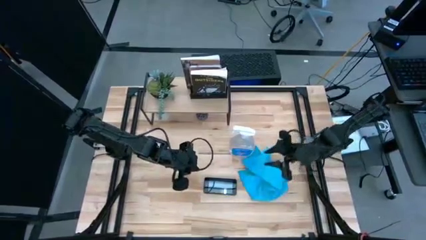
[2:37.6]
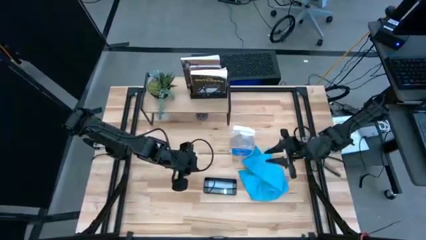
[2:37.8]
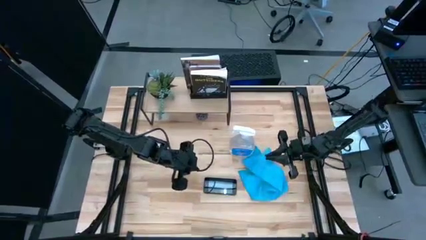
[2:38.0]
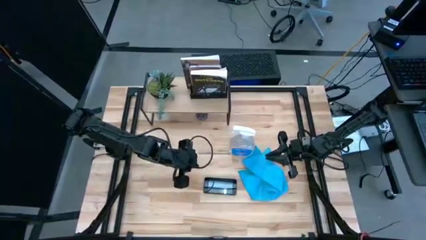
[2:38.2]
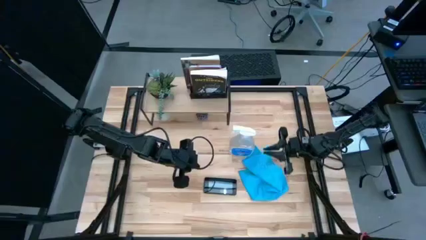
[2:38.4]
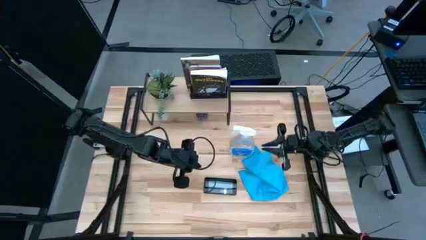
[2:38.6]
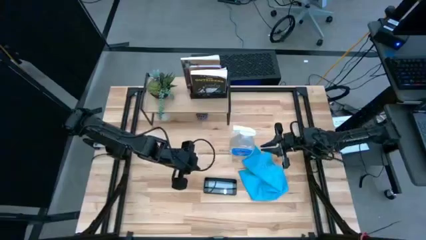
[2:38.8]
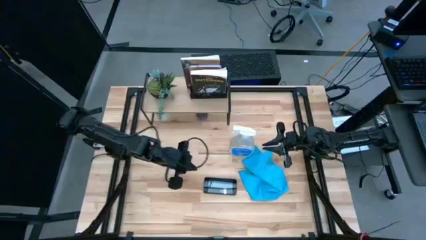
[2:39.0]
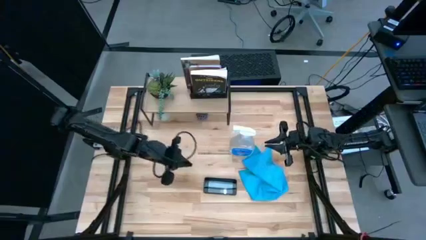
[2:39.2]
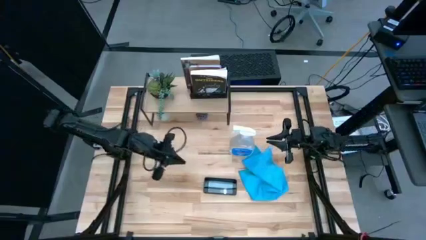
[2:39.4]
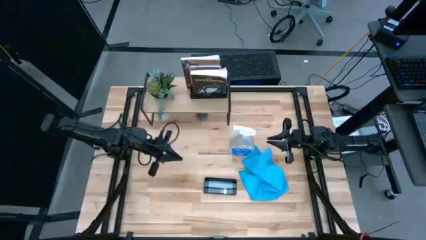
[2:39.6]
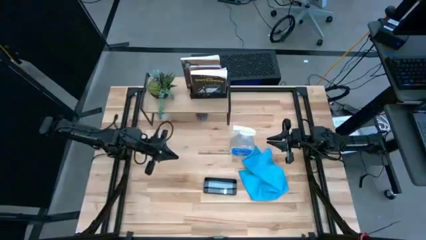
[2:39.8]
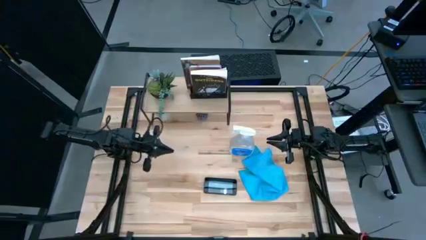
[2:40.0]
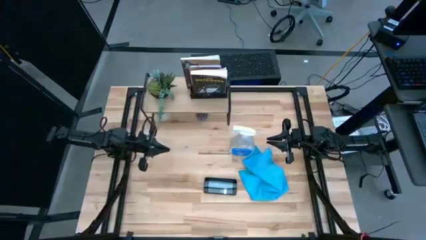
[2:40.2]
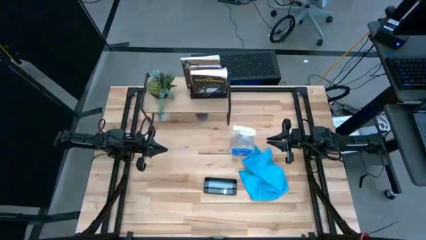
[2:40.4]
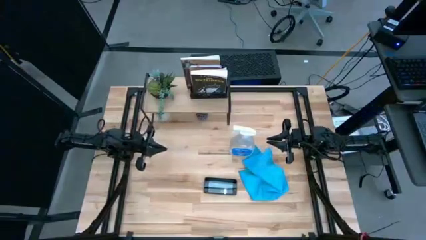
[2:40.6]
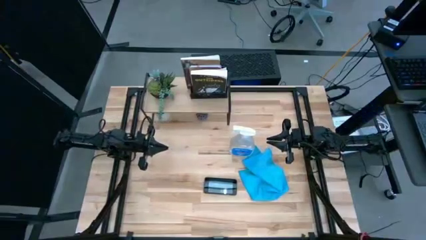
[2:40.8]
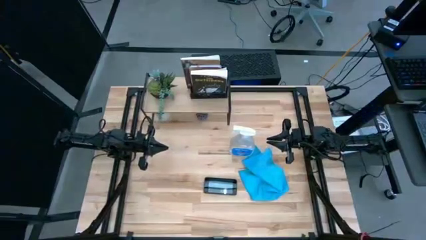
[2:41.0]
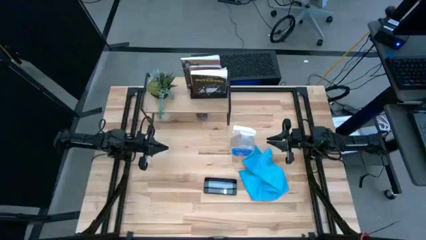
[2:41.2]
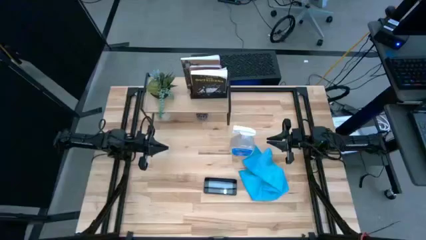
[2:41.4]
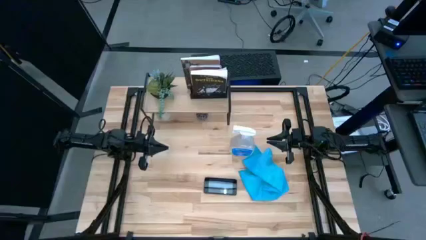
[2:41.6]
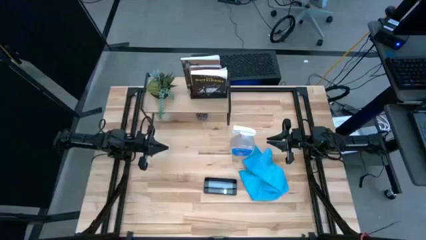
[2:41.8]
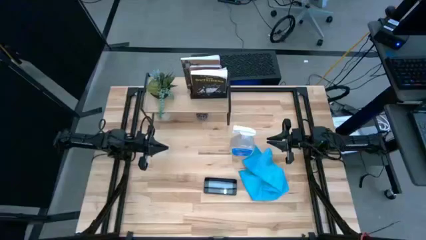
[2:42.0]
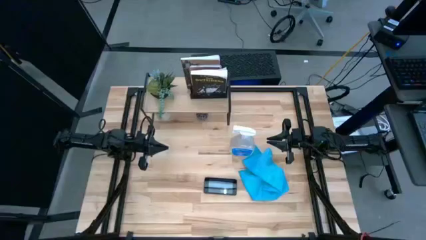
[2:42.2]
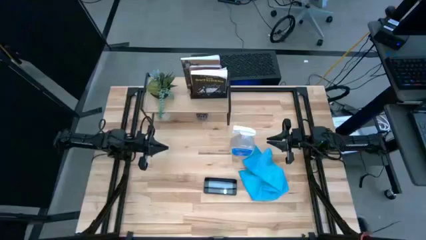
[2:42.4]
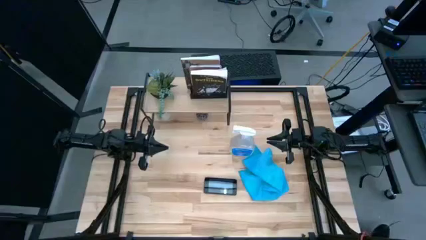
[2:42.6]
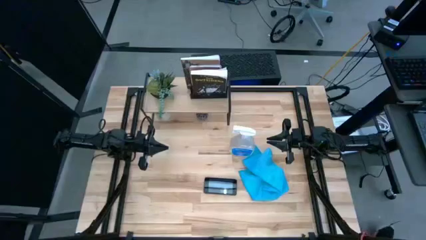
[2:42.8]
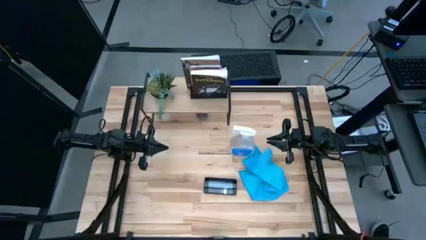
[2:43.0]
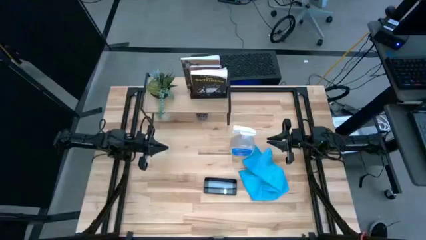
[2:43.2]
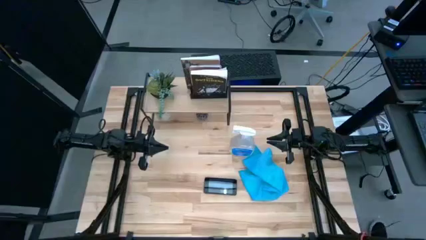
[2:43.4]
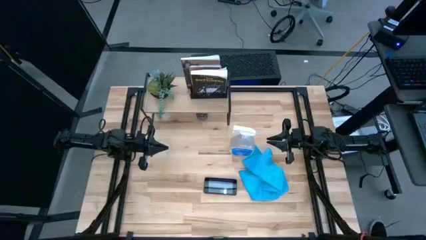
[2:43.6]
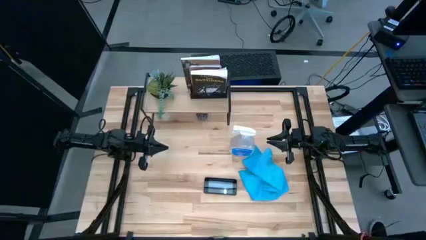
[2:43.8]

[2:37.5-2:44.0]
Task: Apply microfiber cloth
Return to Home Position

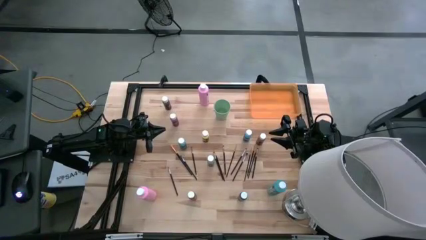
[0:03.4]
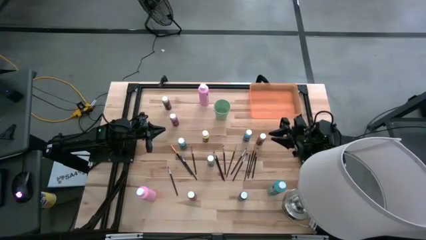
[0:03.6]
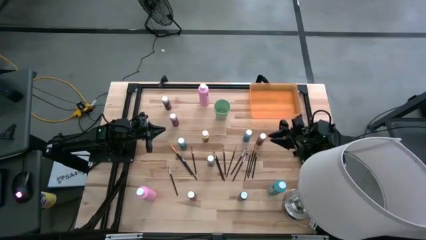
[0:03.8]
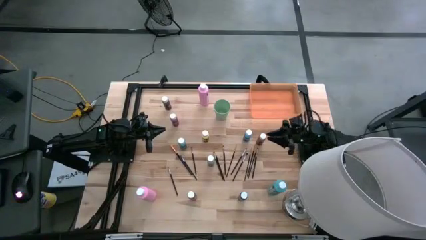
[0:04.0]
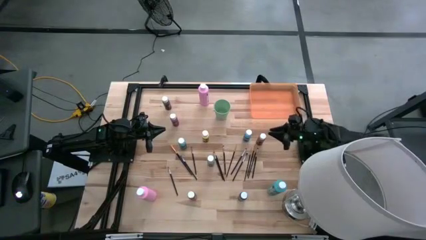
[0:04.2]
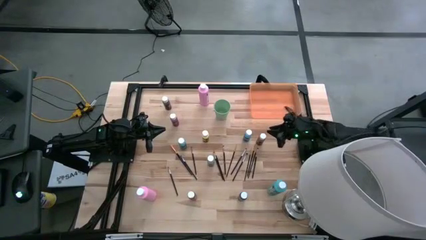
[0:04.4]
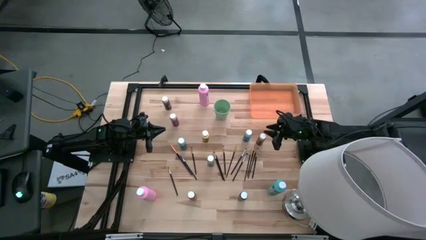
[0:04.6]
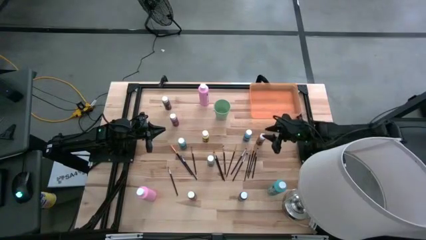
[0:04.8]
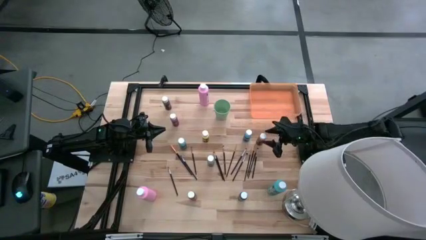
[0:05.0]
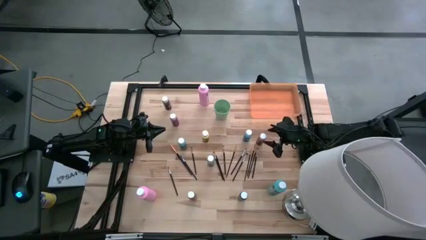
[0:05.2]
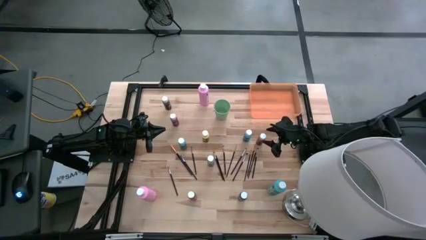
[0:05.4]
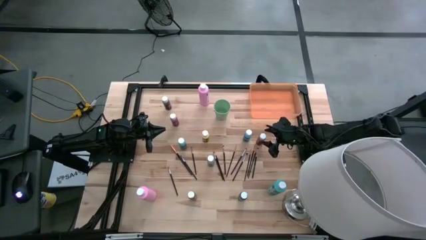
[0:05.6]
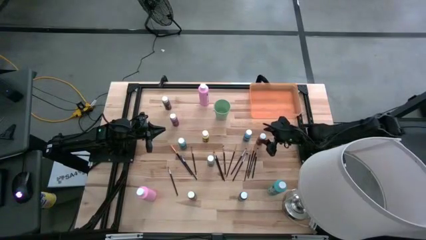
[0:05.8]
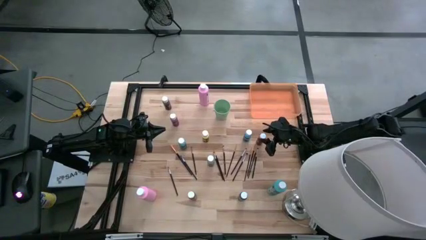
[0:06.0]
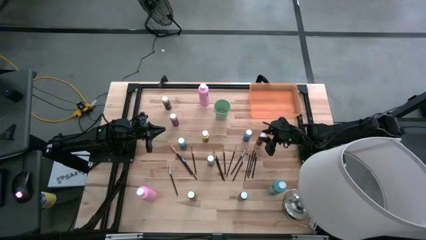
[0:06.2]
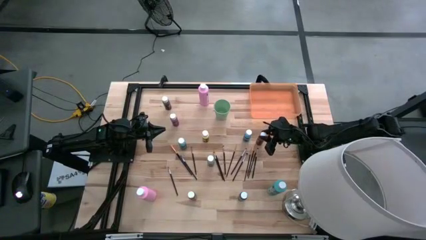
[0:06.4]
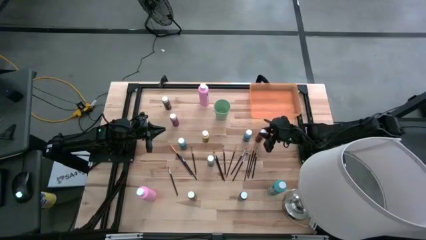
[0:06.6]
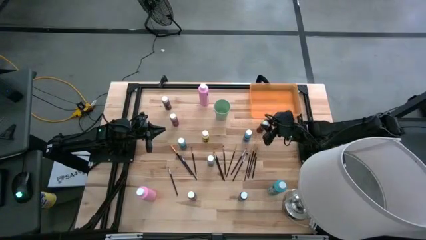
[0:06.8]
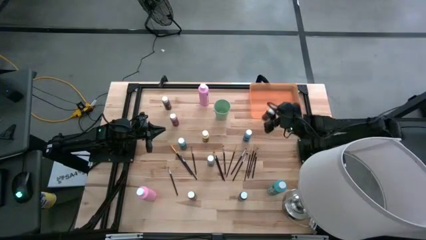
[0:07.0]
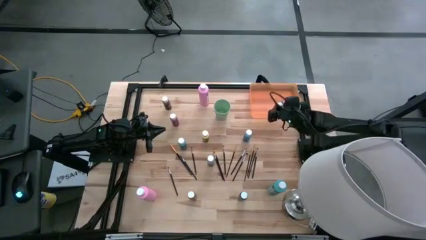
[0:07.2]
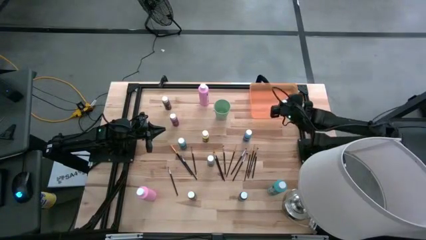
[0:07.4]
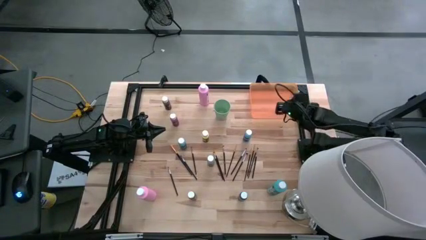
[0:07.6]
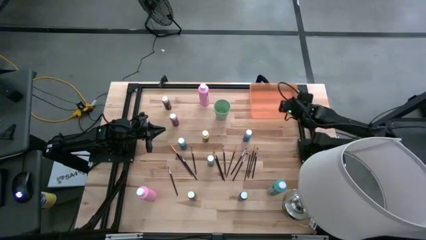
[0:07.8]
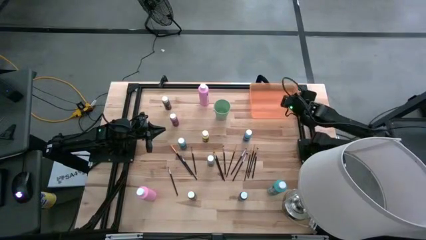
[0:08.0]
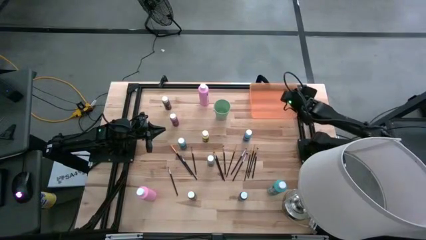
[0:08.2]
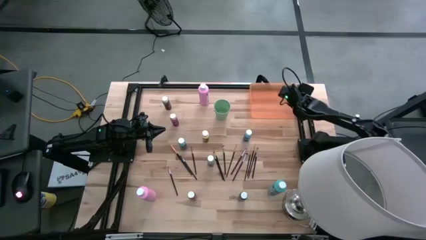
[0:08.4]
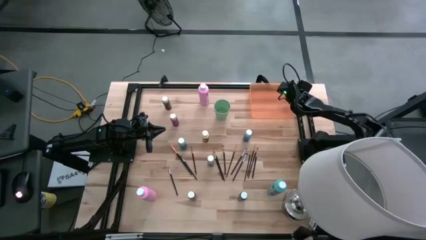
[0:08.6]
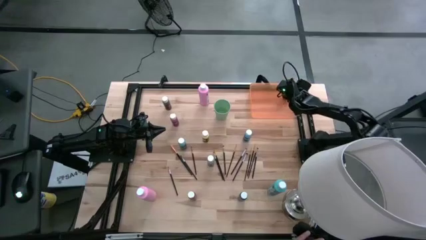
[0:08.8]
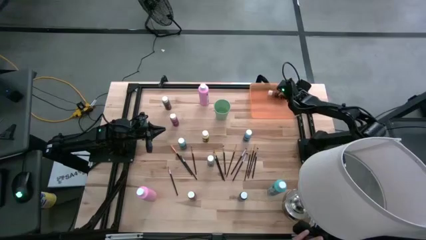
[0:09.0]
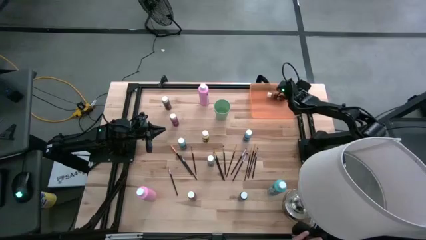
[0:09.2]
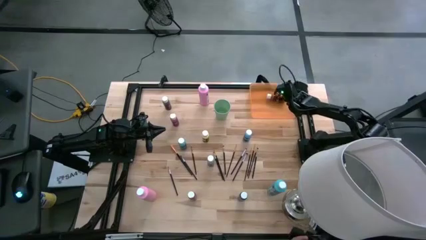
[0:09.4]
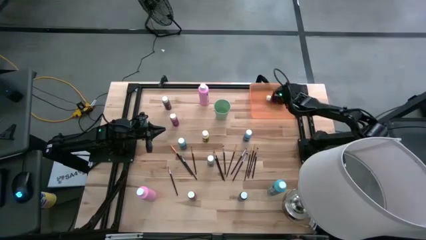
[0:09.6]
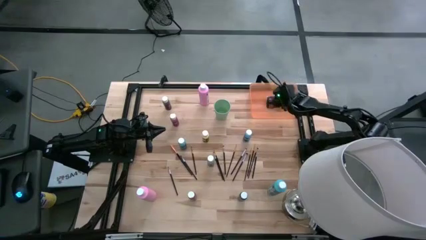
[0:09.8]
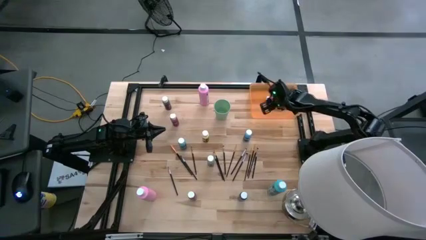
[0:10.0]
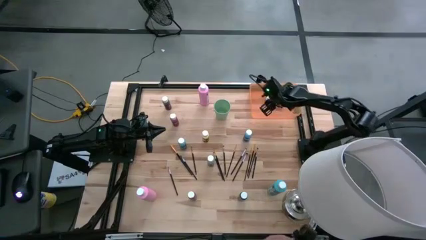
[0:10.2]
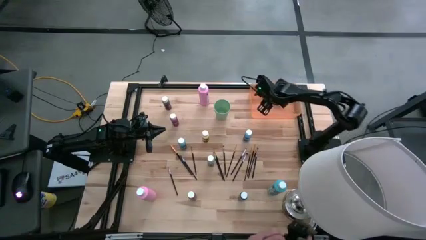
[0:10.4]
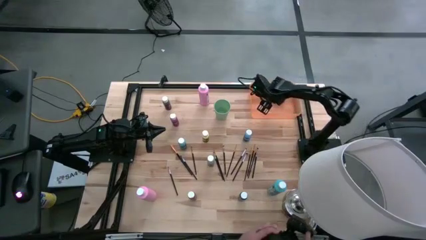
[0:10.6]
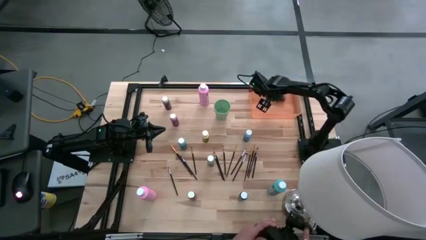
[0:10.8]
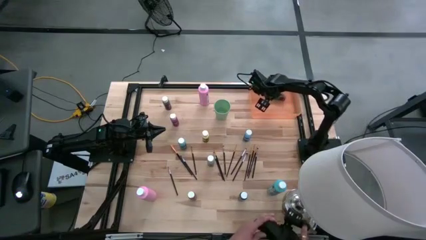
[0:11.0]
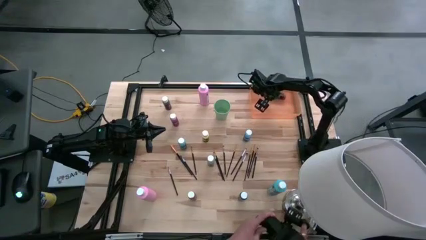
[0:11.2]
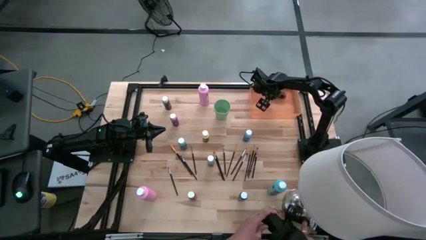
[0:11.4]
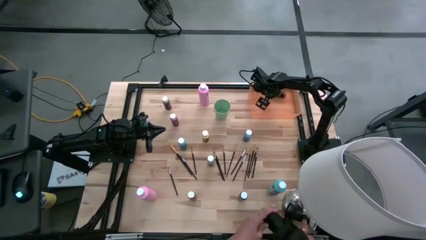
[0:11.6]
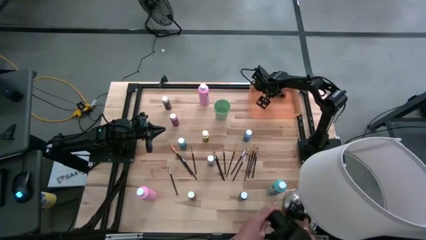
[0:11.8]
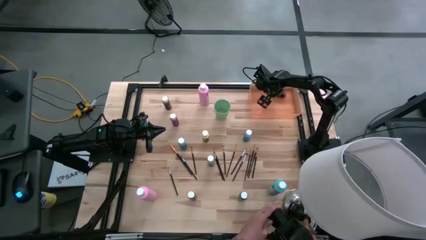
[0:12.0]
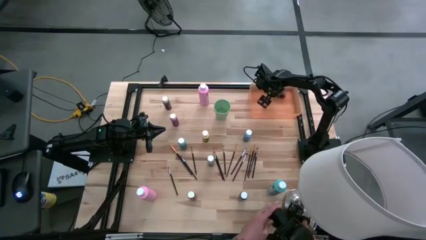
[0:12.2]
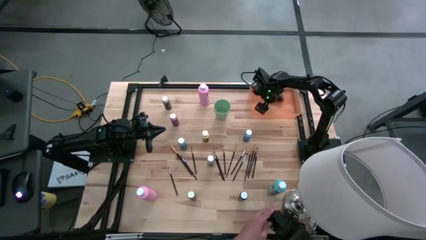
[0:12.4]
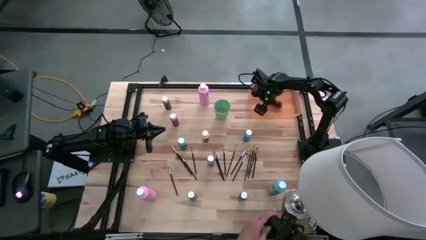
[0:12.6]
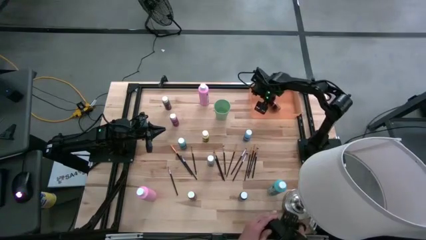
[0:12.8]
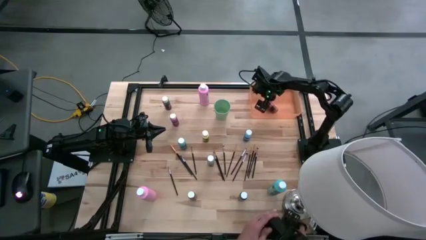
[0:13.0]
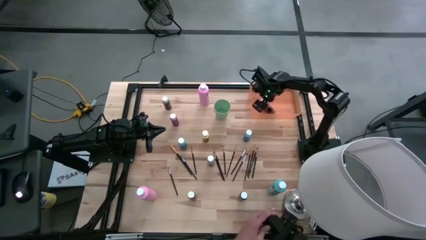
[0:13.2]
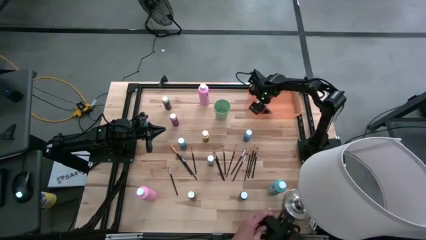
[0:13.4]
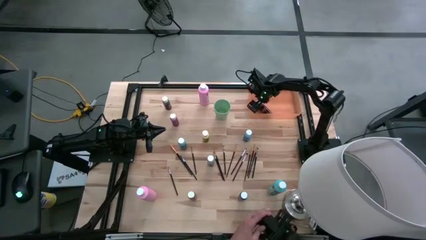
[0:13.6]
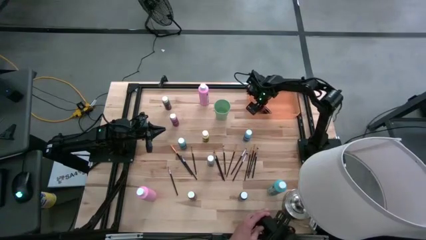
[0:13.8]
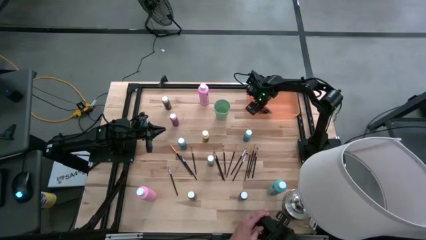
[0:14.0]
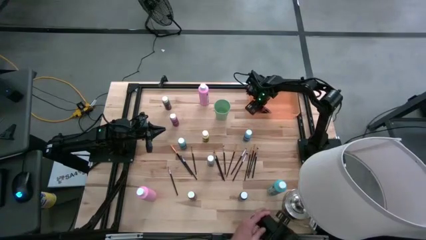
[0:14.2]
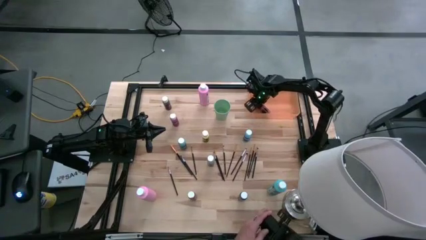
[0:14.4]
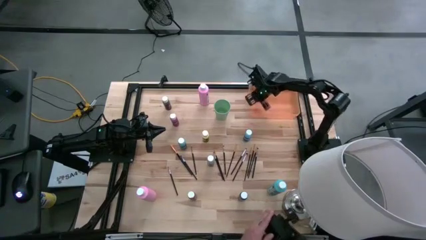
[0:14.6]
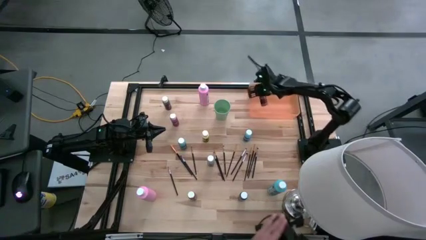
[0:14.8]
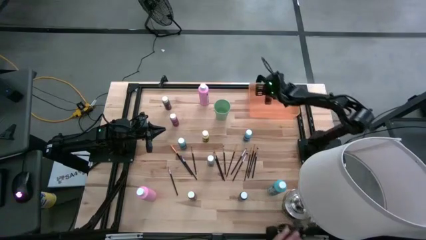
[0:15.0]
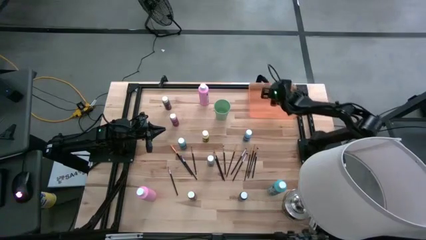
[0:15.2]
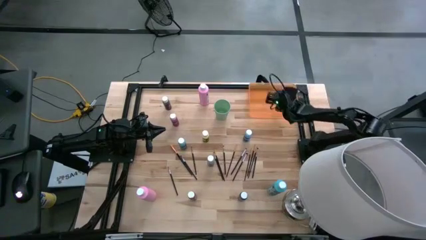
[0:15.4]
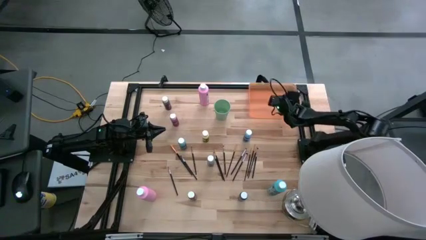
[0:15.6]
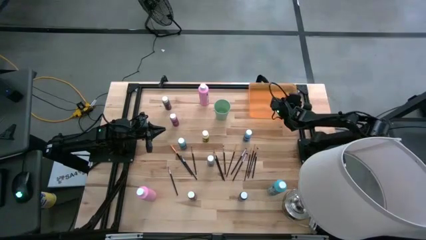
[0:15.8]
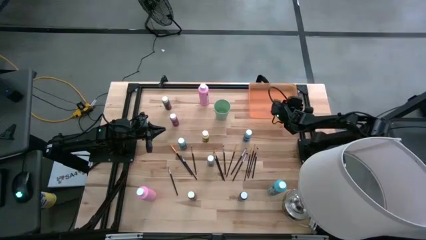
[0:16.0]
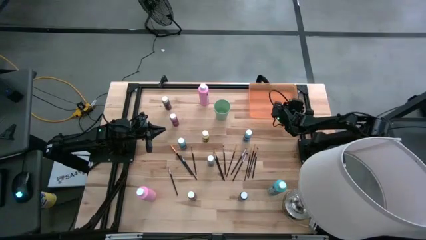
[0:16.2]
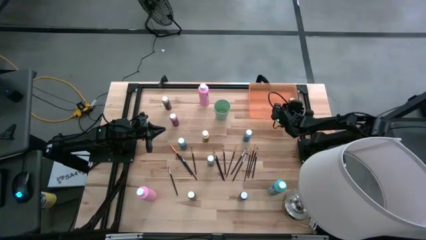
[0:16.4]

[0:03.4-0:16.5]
Task: Pick & Place Paint Supplies
Put the middle small brown paint bottle into the orange bin
